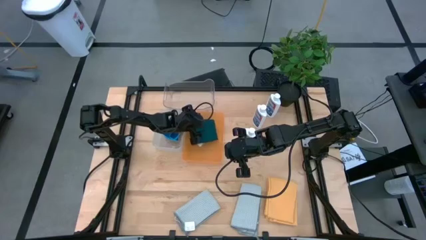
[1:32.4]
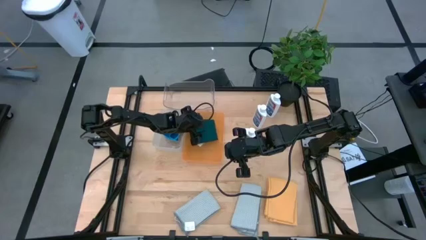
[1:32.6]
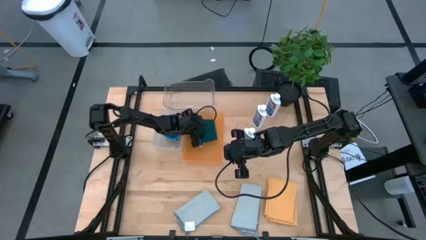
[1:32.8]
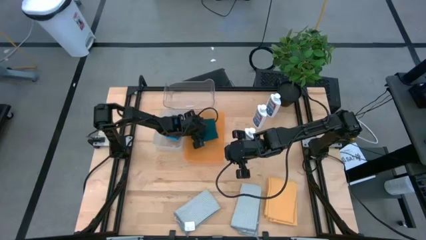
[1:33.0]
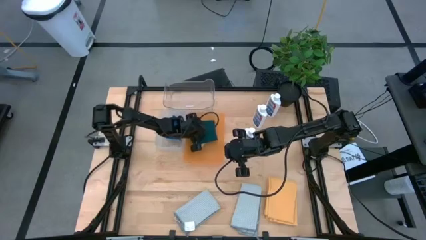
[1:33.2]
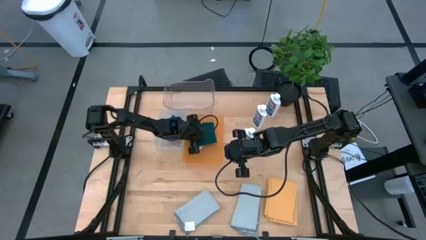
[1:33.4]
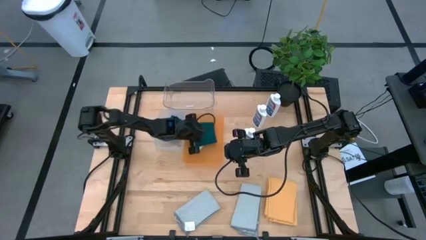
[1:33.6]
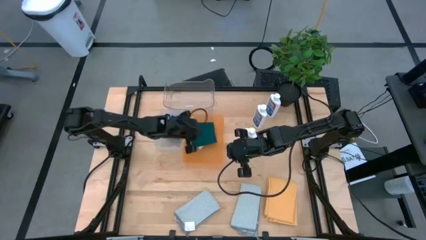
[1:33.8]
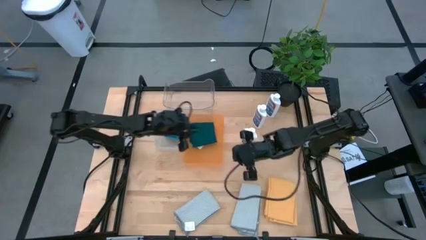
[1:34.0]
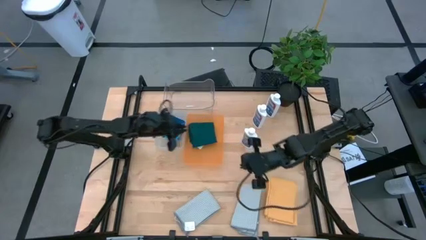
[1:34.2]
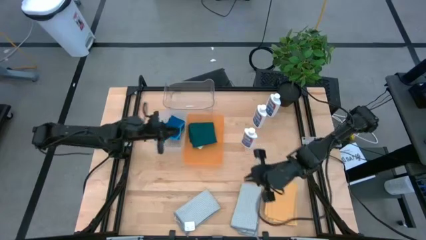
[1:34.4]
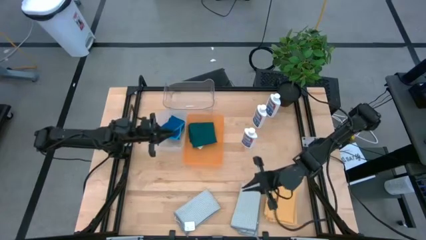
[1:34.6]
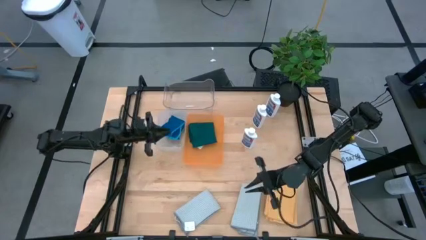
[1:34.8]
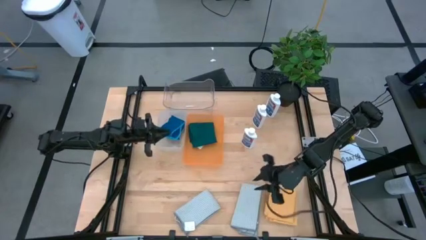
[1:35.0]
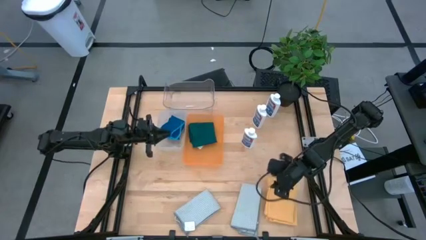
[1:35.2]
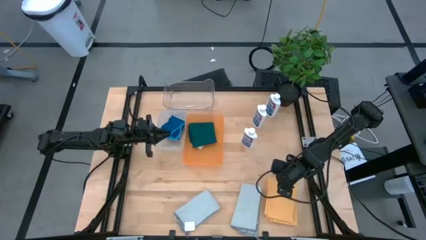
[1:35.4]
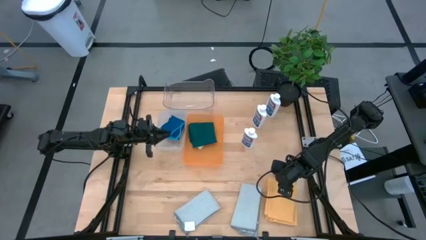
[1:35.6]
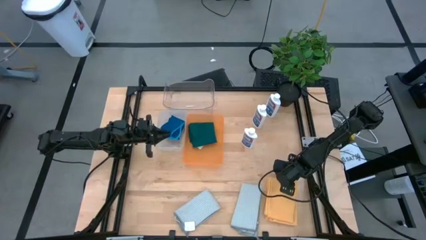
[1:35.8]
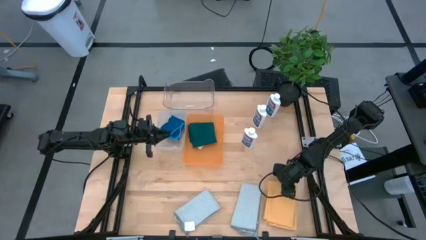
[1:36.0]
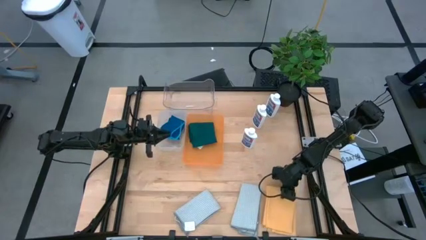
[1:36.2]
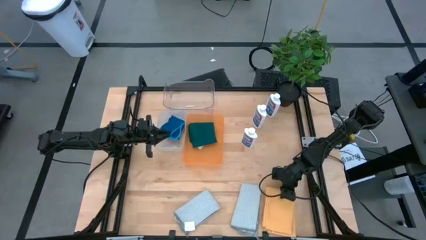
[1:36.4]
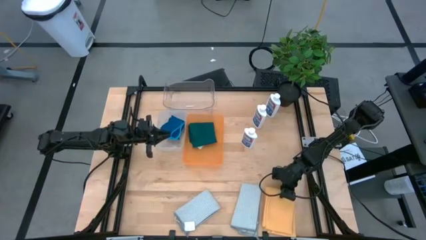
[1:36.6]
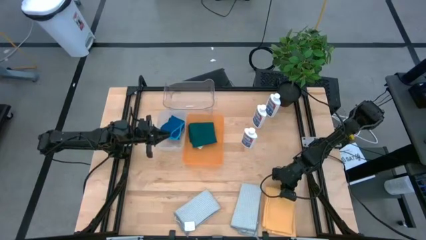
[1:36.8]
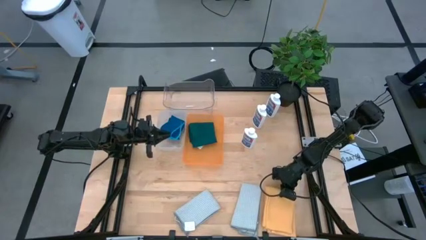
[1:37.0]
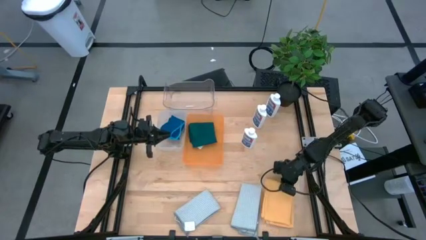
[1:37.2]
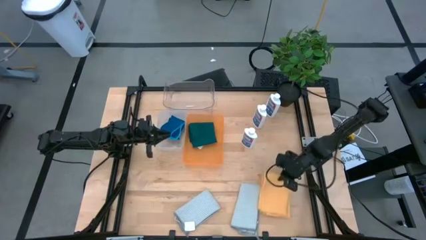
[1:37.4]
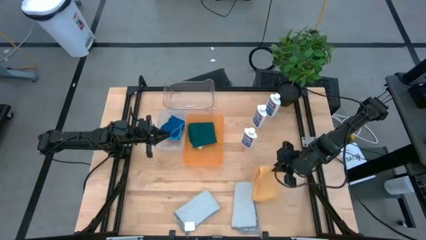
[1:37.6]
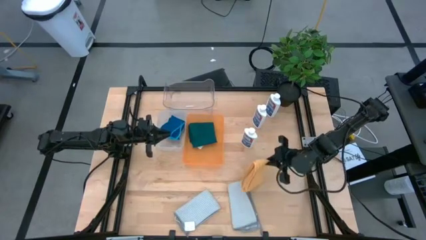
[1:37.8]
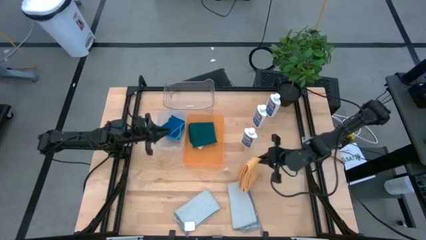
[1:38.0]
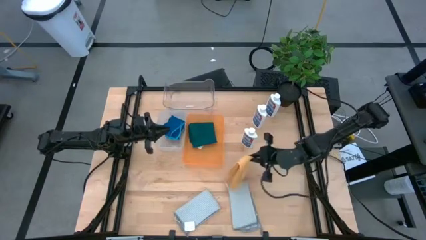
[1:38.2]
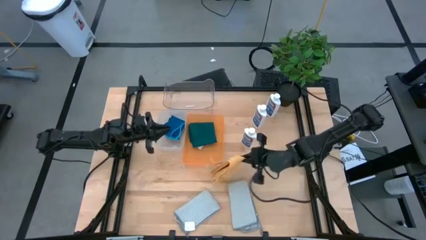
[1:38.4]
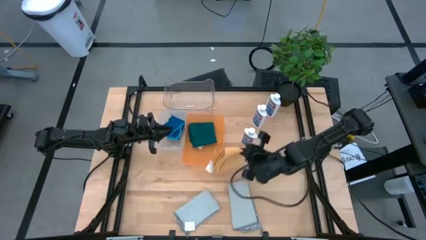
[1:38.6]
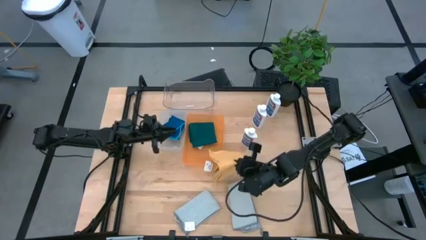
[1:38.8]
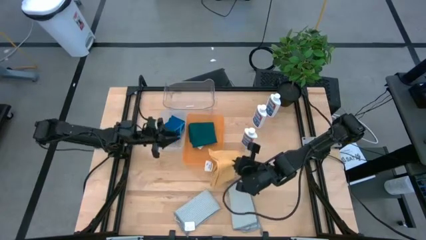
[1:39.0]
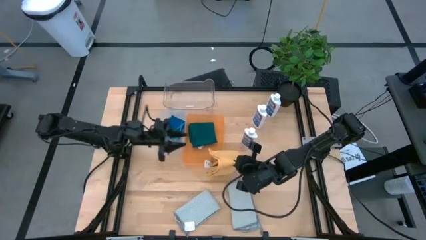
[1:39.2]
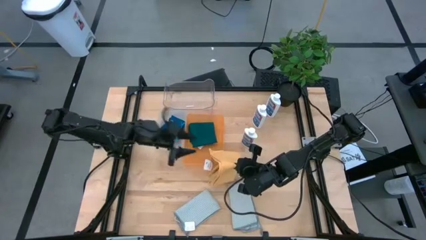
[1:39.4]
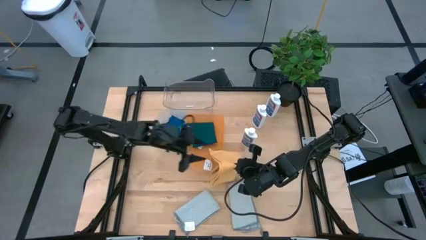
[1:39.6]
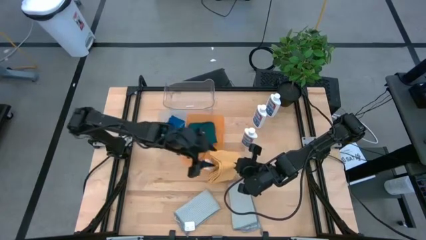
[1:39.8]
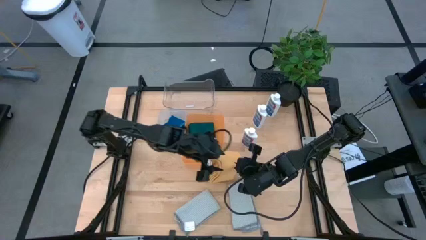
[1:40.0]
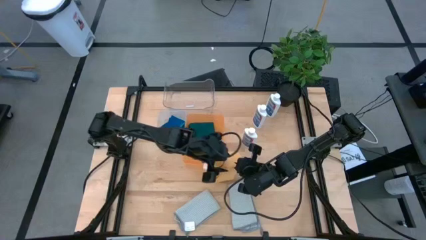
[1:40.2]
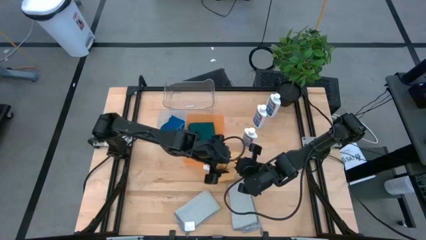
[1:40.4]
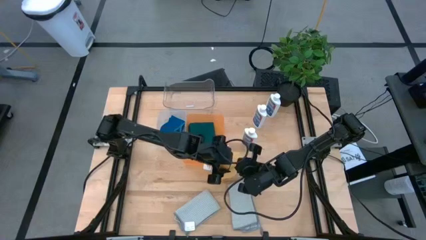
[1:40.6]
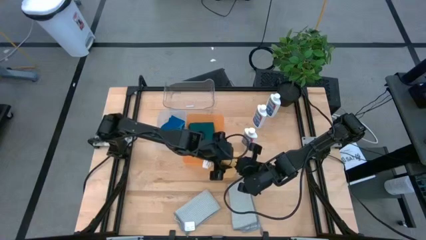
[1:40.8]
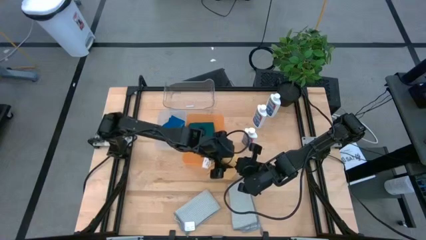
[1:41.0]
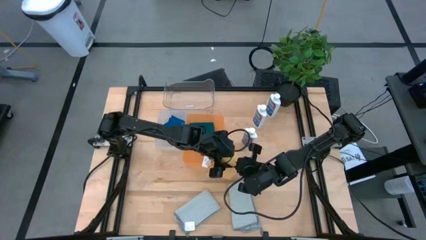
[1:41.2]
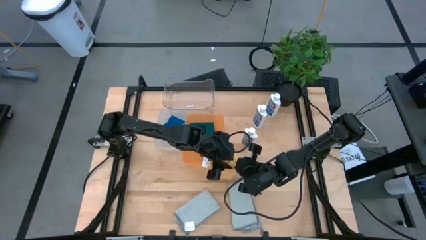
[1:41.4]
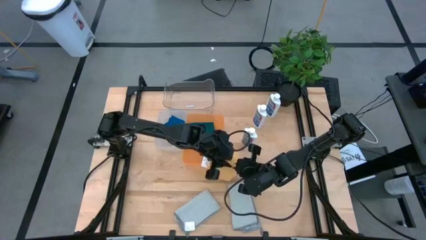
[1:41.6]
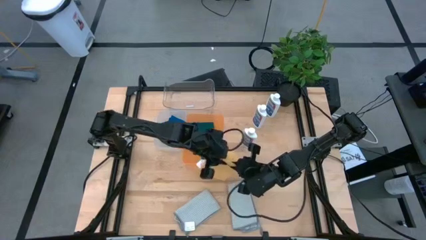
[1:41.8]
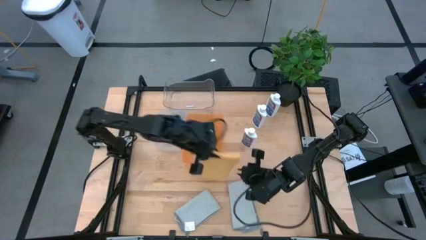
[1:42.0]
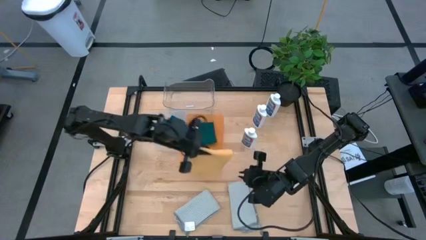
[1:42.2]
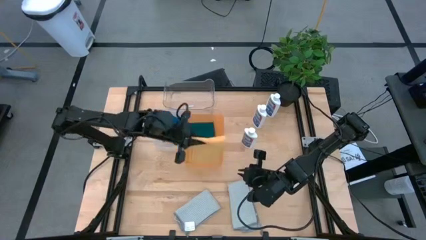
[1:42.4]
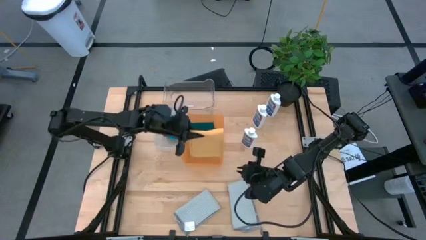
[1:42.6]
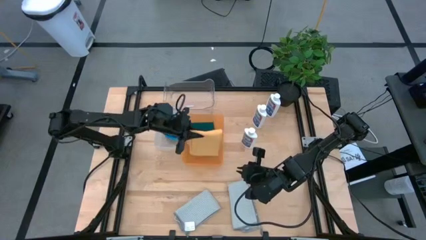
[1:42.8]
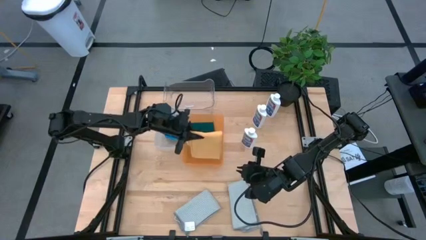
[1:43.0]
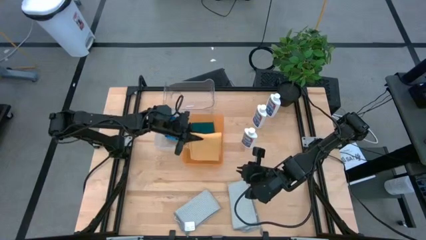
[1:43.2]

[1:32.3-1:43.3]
Task: Pick & Place Kitchen Items
Put the yellow towel into the orange bin
